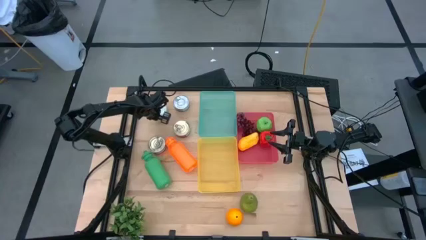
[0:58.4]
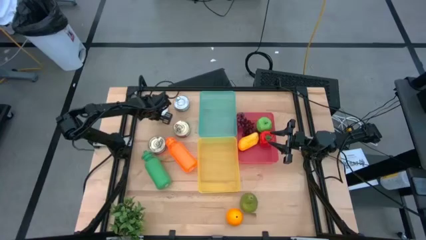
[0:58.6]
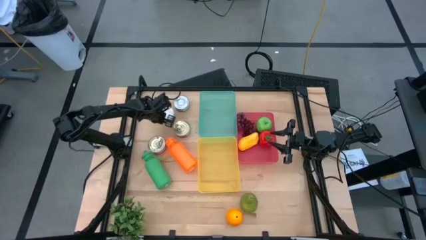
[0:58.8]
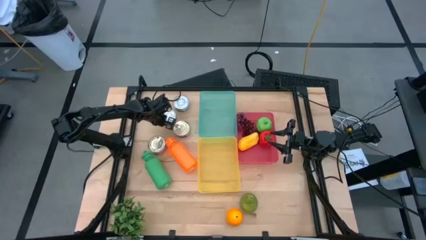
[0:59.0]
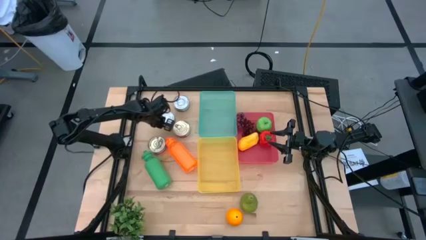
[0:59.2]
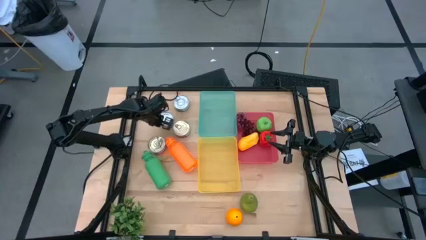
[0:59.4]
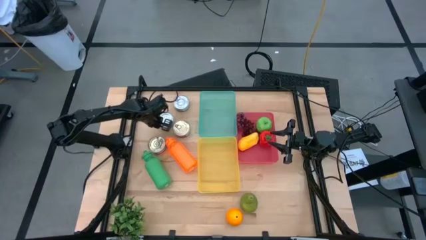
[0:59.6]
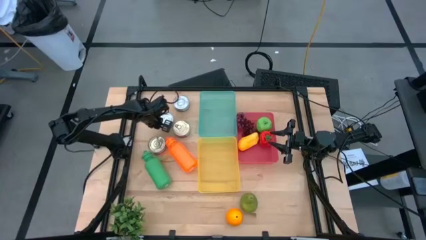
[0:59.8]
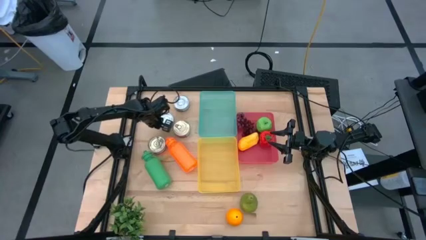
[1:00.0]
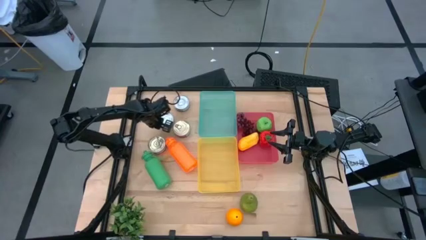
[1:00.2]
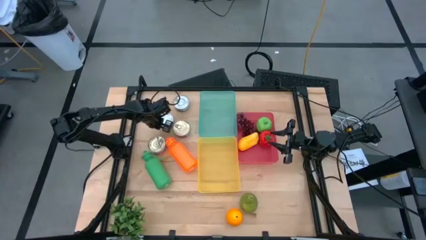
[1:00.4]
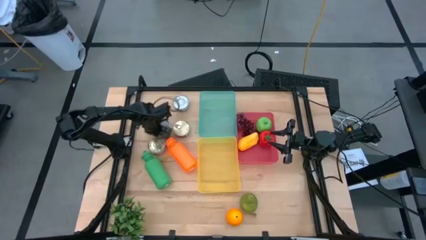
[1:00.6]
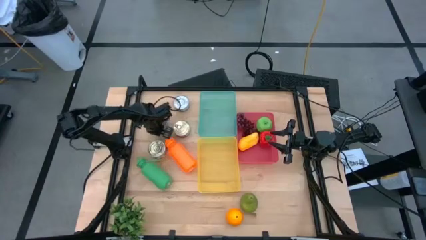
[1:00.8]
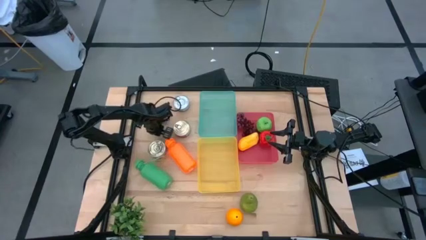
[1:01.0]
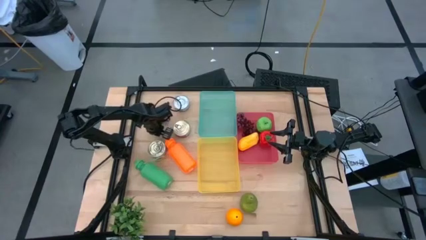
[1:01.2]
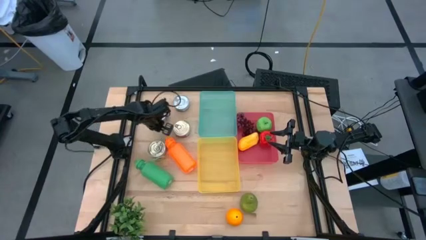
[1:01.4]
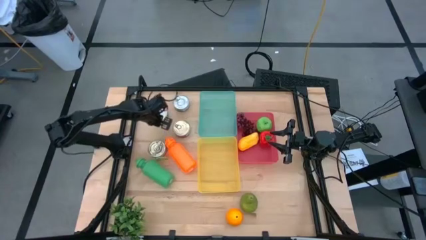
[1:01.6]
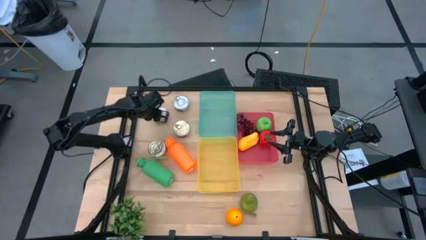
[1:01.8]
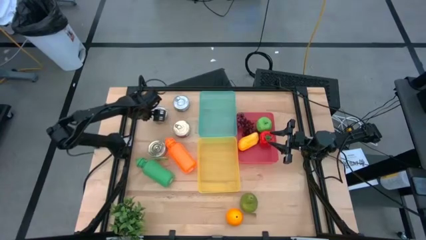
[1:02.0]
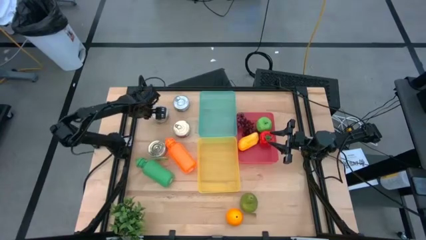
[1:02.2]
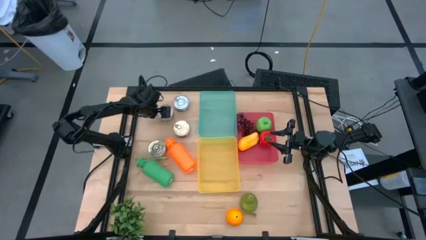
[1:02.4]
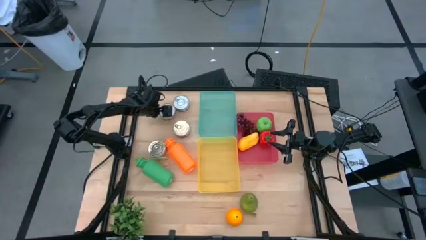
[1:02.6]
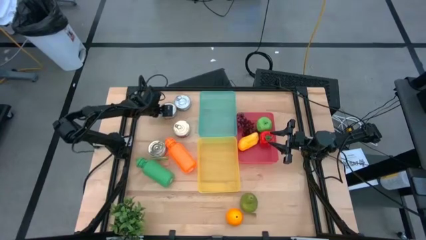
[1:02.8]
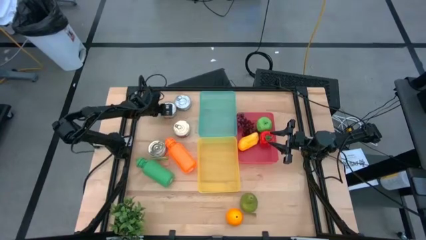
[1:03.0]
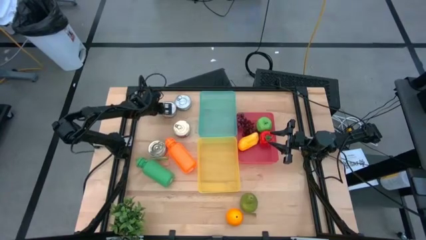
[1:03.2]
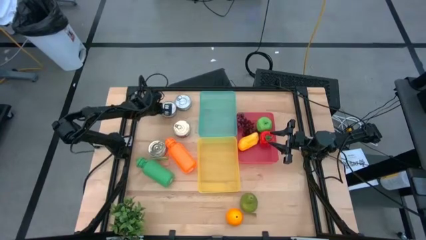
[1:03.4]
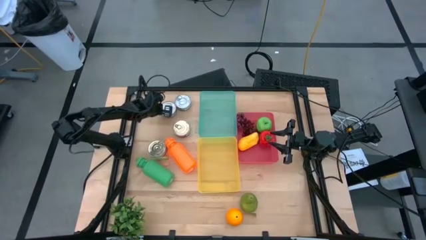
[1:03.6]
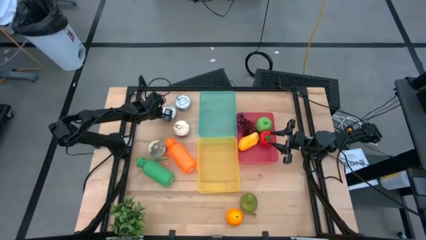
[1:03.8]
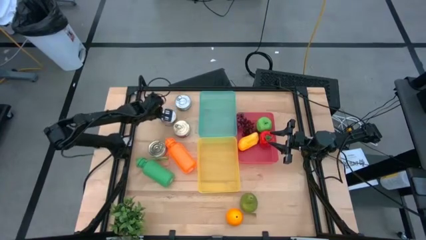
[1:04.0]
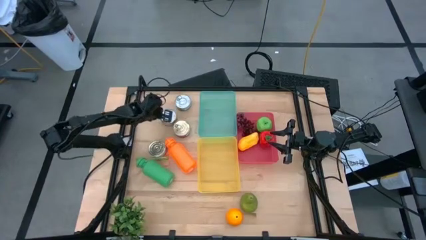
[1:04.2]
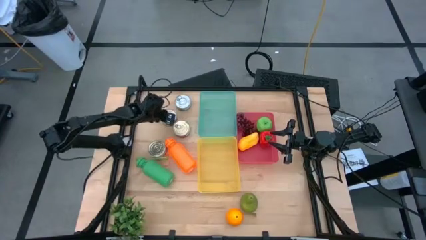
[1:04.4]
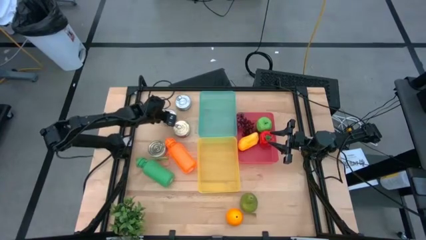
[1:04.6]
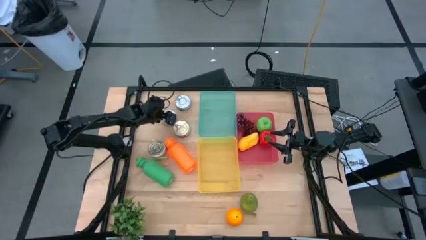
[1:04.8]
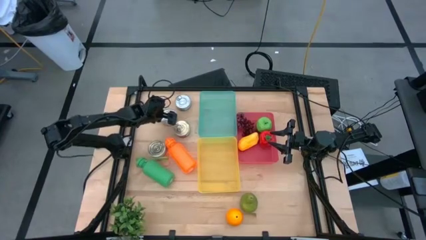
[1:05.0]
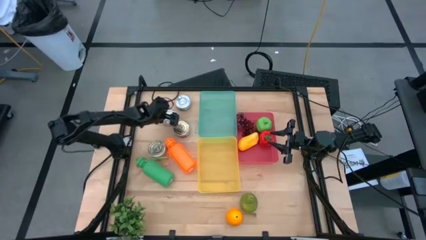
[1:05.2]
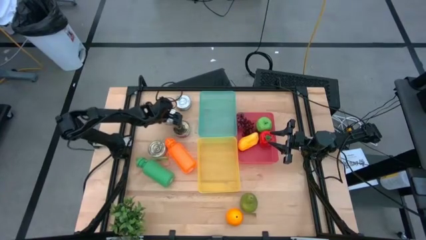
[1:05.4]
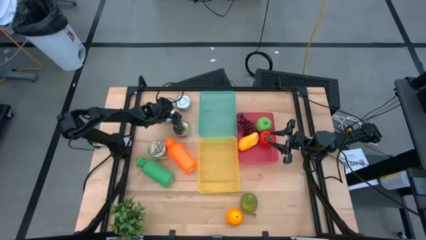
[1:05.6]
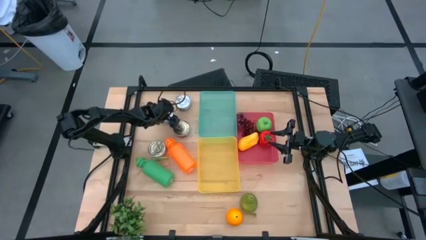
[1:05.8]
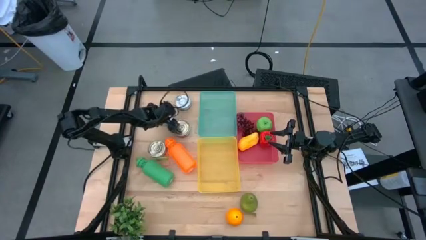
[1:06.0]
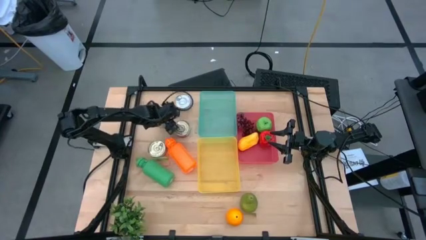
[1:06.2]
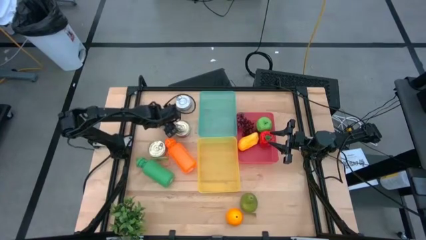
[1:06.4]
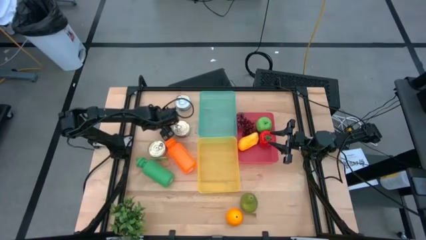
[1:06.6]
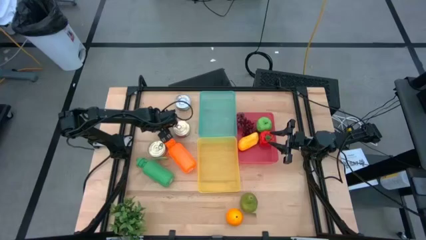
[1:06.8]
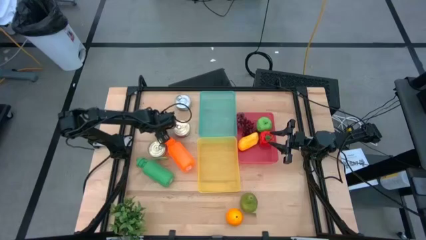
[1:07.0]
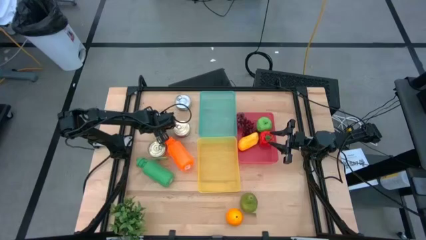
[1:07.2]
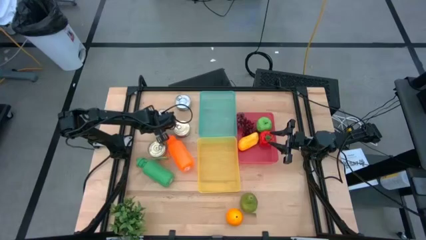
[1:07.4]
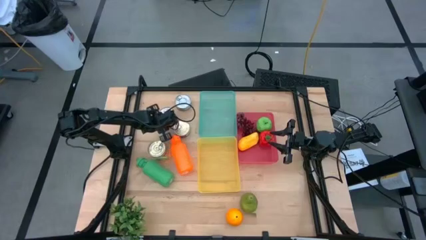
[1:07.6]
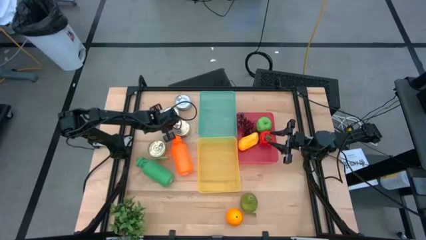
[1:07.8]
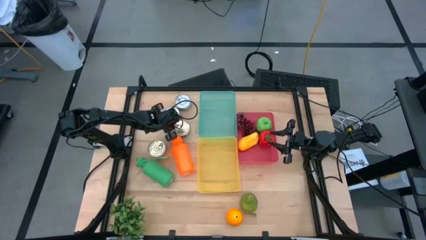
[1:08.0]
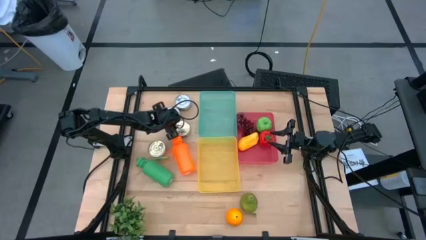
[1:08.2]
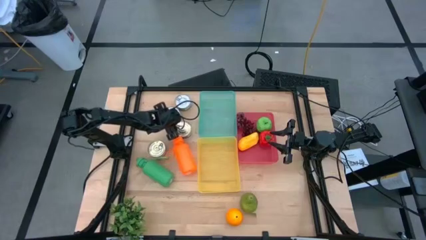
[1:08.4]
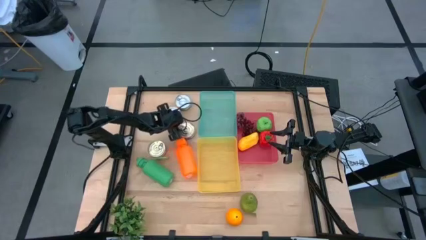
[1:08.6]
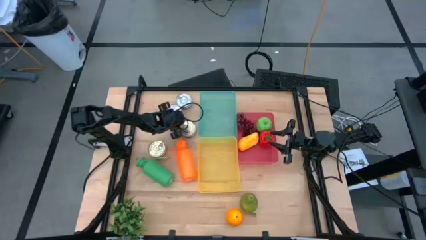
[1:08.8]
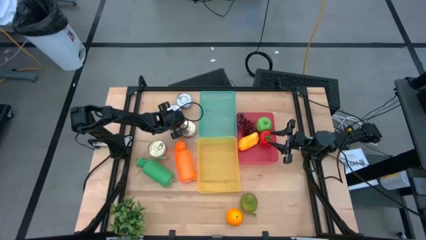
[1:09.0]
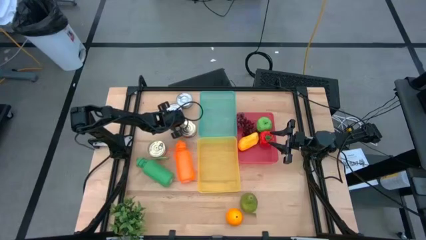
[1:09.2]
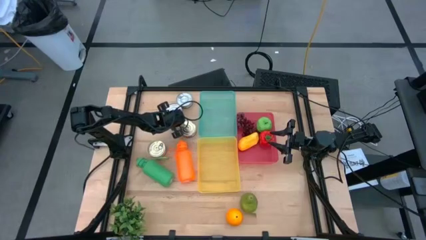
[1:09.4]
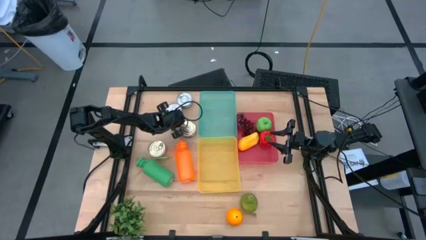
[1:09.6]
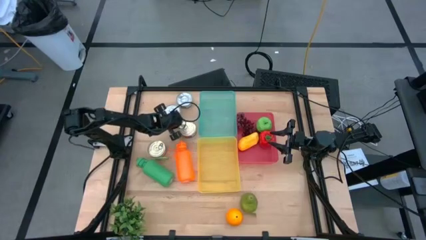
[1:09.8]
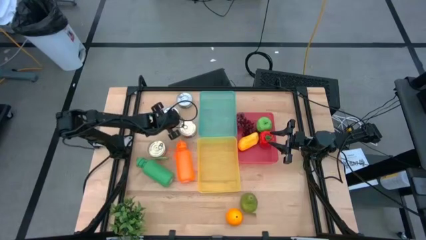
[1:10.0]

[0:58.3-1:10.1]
Task: Pick & Place Food Item
Put the left green tuna can into the light blue bin

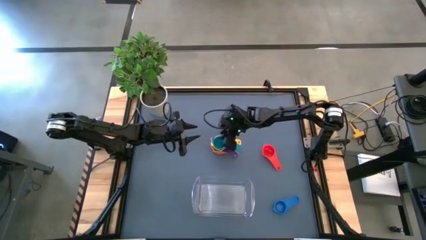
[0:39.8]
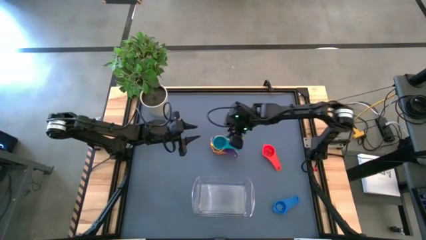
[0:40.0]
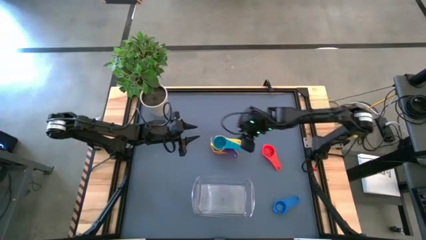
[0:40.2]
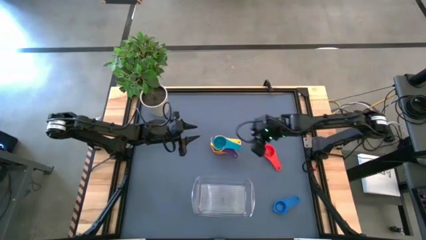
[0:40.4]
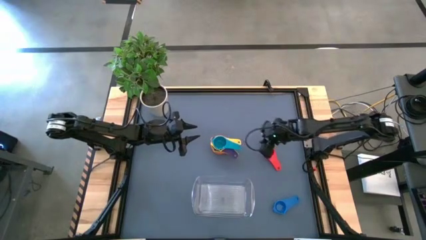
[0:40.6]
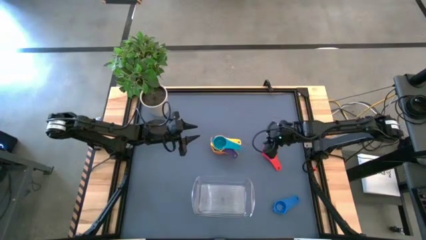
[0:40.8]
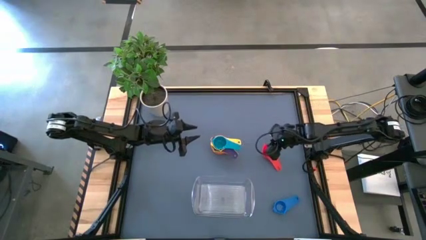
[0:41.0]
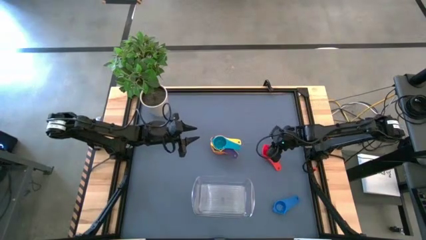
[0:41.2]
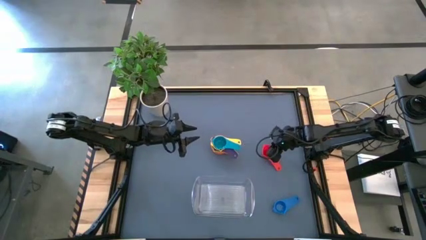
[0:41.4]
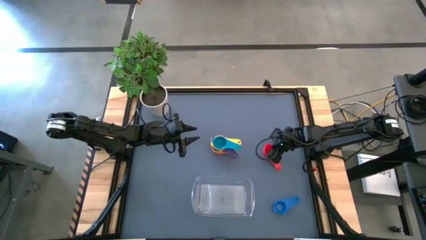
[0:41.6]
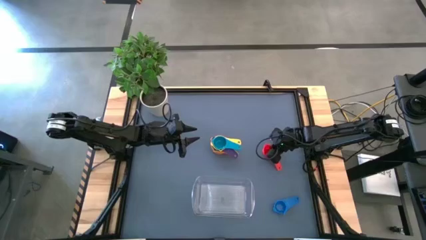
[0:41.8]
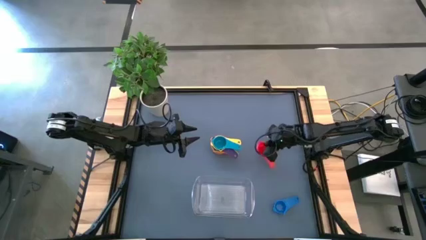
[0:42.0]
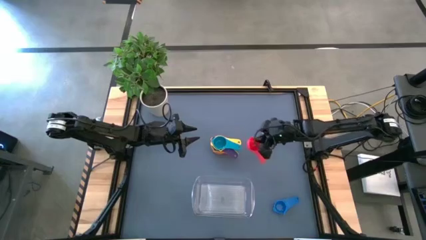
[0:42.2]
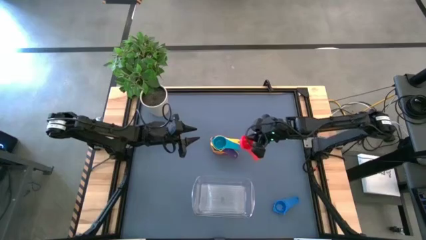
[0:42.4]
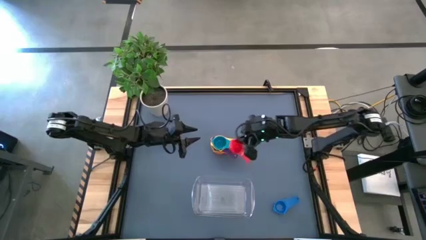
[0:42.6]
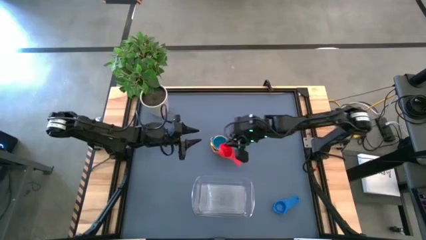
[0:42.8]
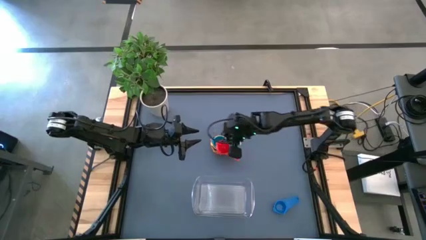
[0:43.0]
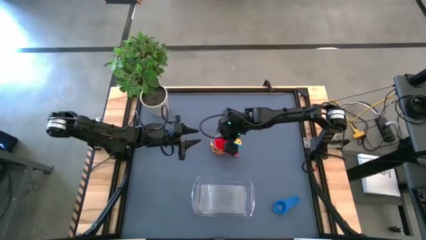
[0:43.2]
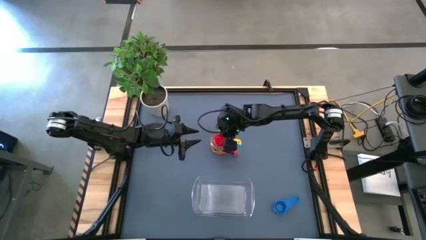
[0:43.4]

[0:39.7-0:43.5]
Task: Nest measuring cups in basket
Stack the orange measuring cup on top of the light blue measuring cup
